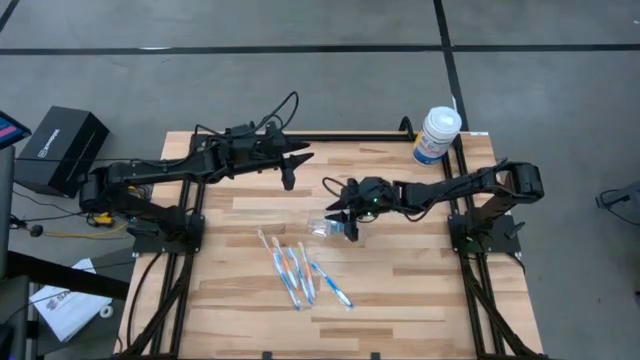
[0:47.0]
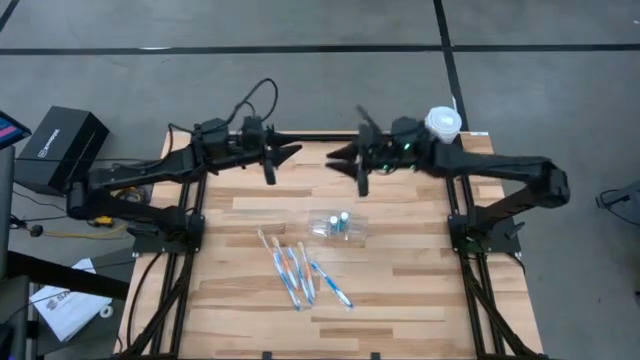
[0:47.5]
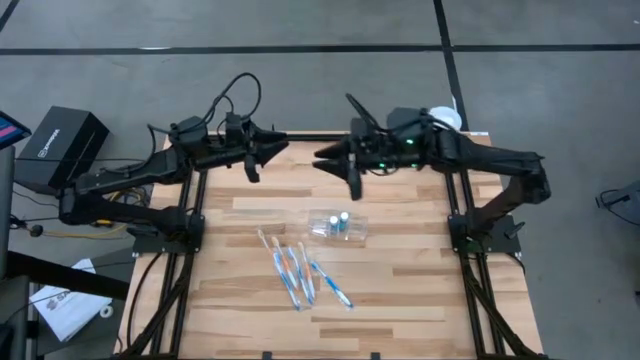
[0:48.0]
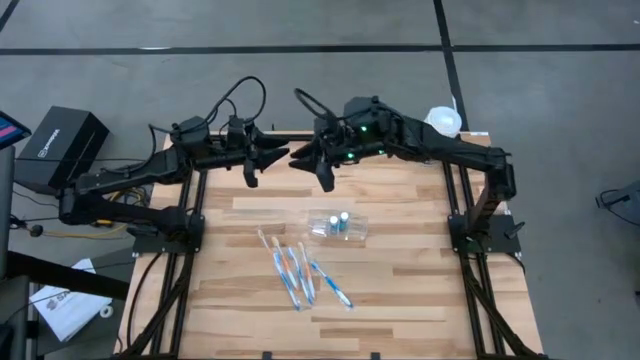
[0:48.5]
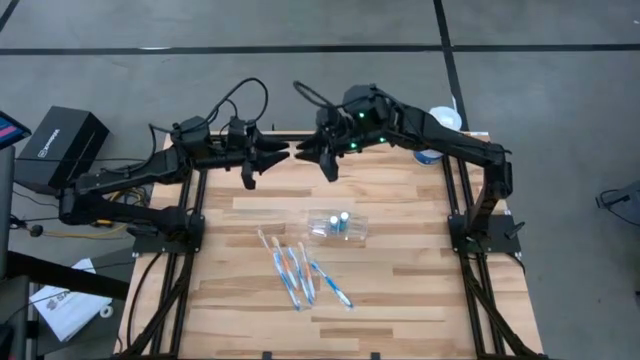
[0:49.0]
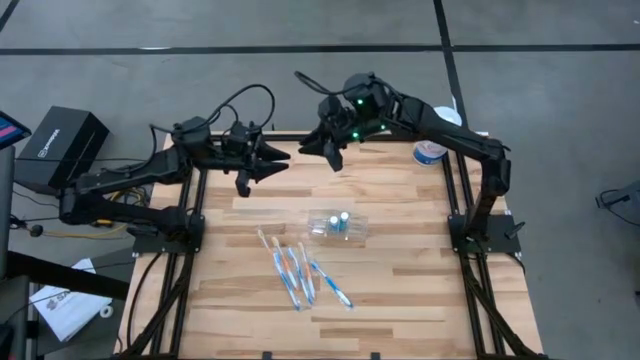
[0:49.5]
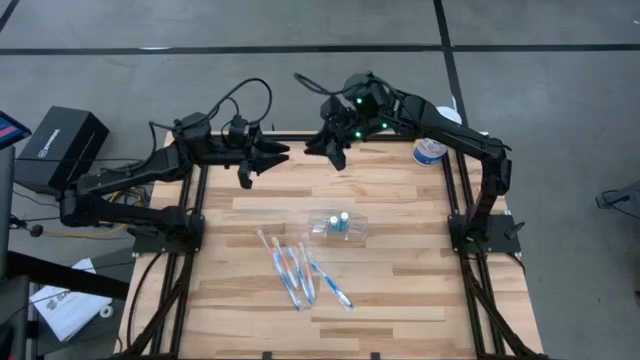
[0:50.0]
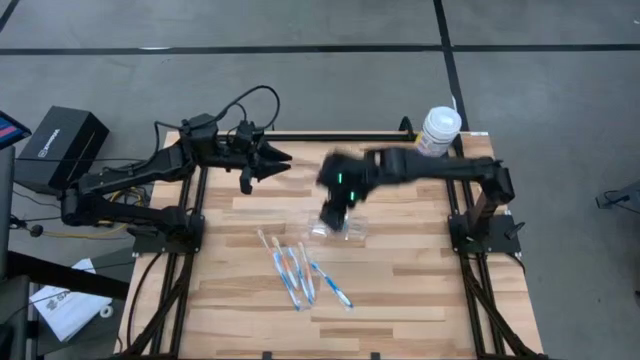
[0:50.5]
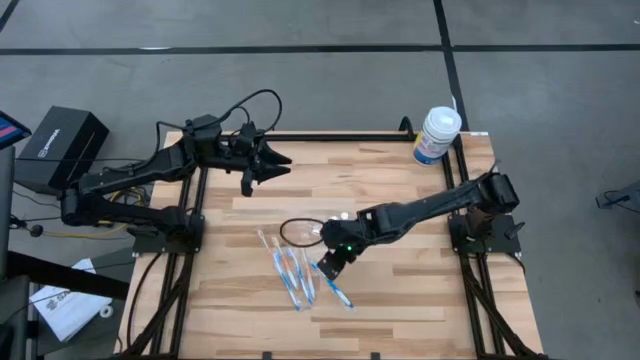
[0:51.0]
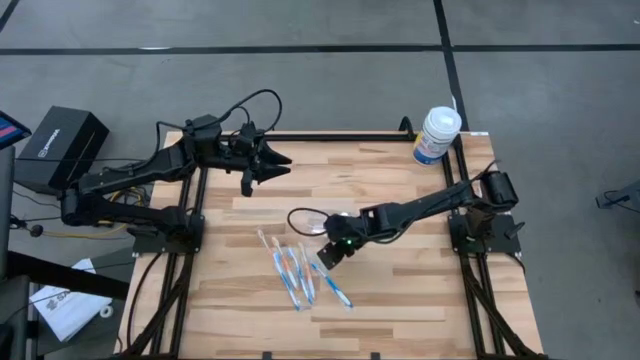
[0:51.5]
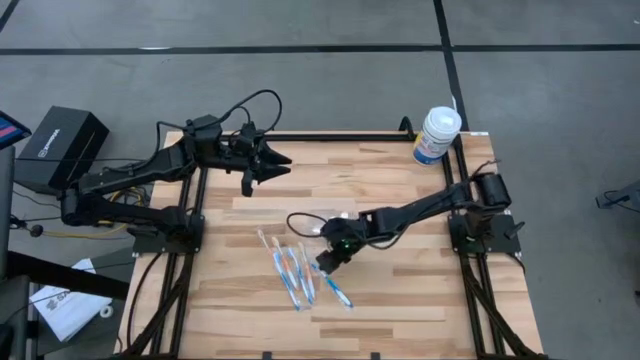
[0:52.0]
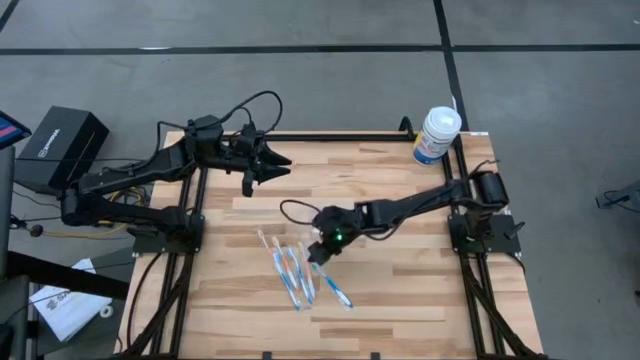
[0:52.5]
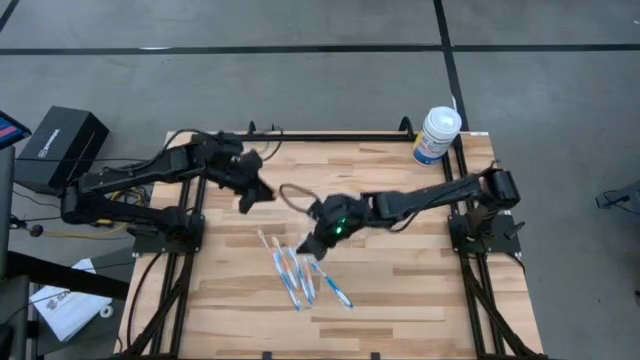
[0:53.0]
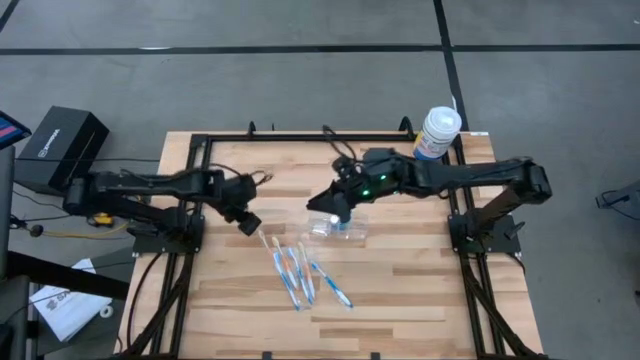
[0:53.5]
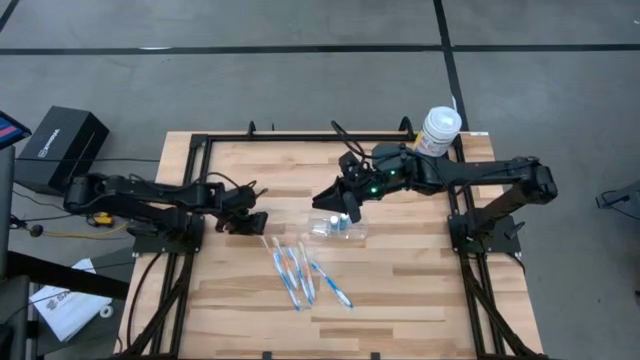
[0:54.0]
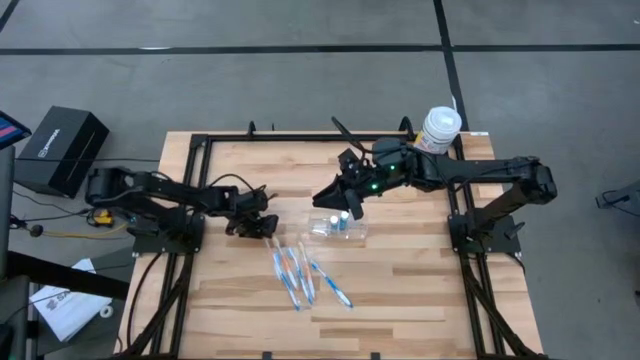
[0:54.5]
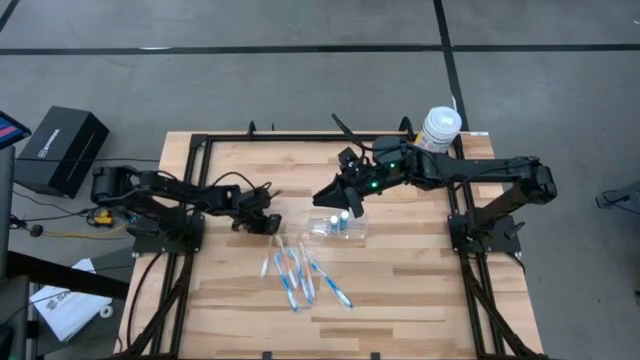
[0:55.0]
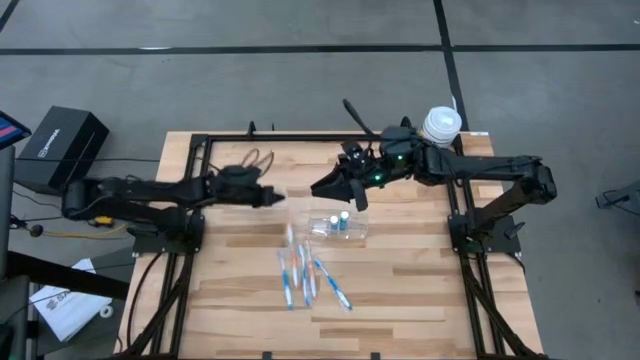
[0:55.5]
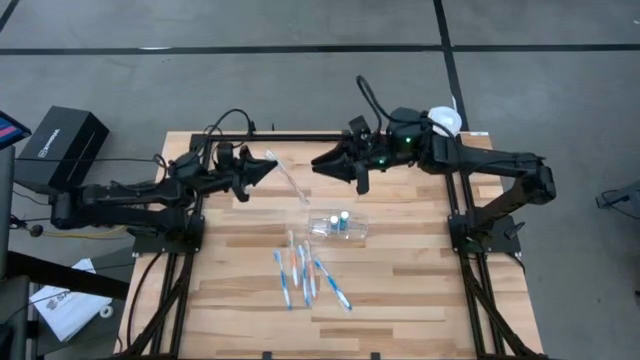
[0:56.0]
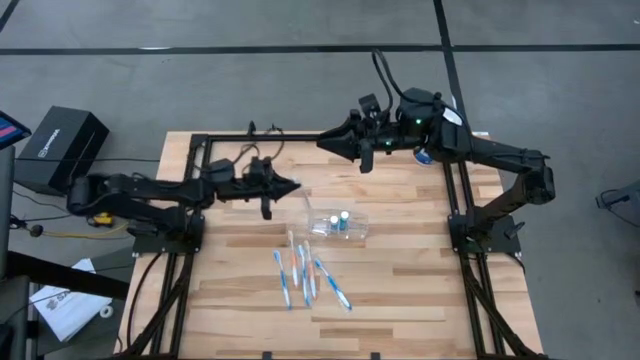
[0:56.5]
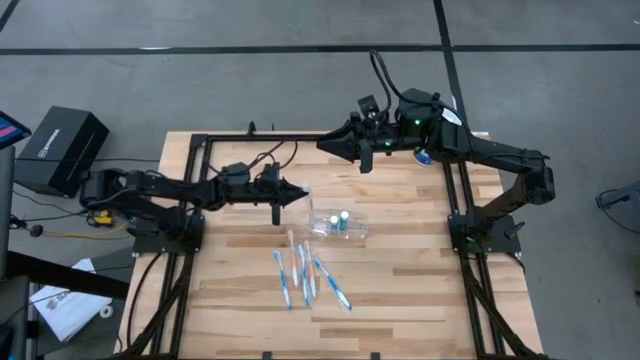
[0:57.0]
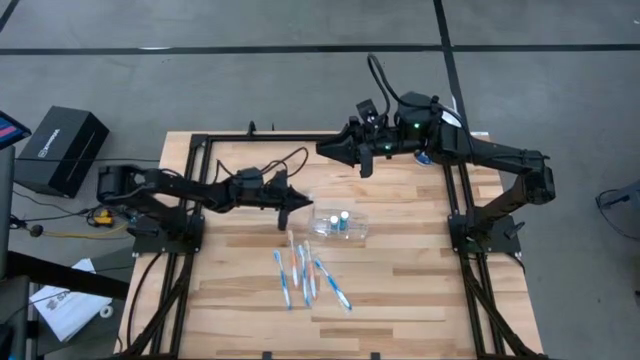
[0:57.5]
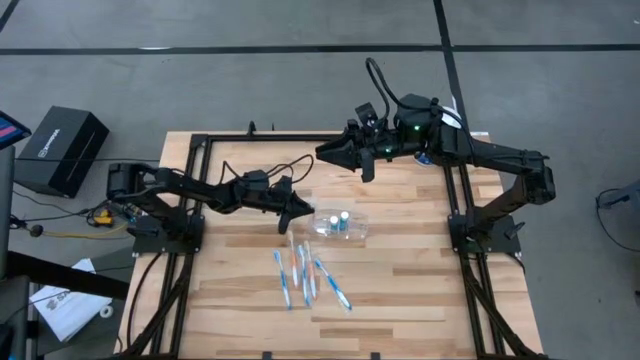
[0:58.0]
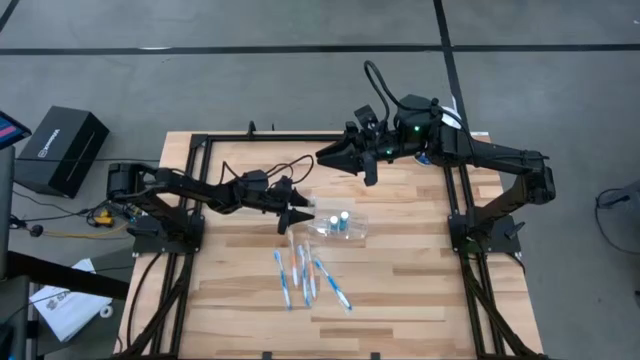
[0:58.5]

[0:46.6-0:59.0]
Task: Pick & Place toothbrushing station
Put the left orange toothbrush into the transparent organizer

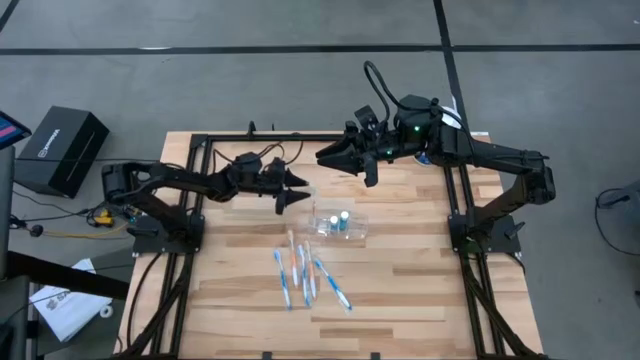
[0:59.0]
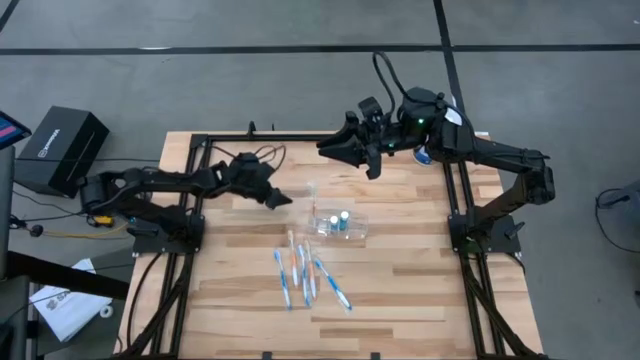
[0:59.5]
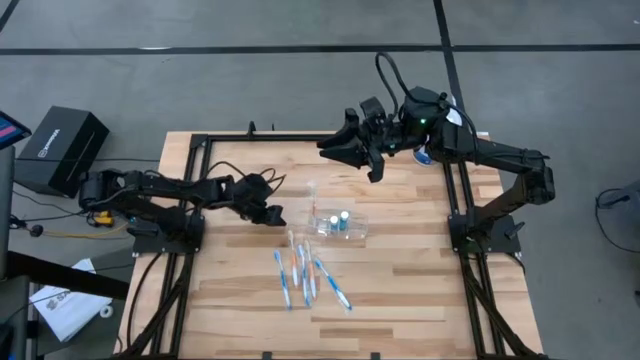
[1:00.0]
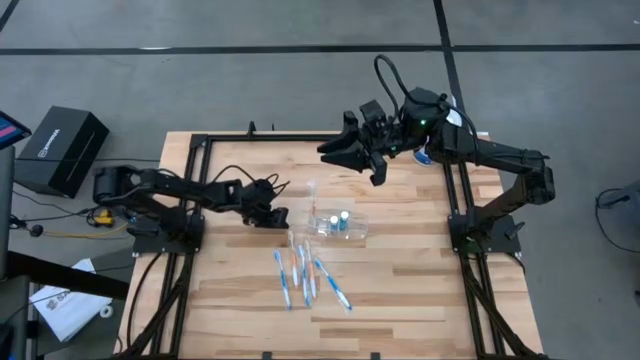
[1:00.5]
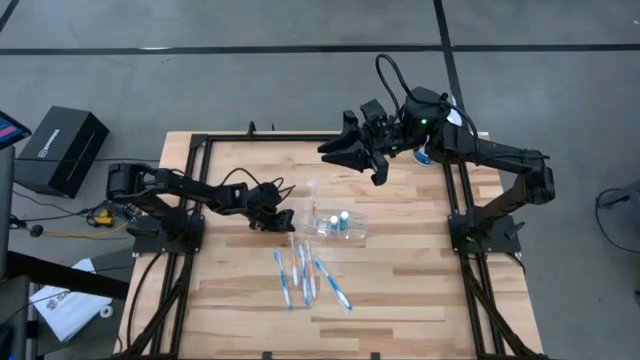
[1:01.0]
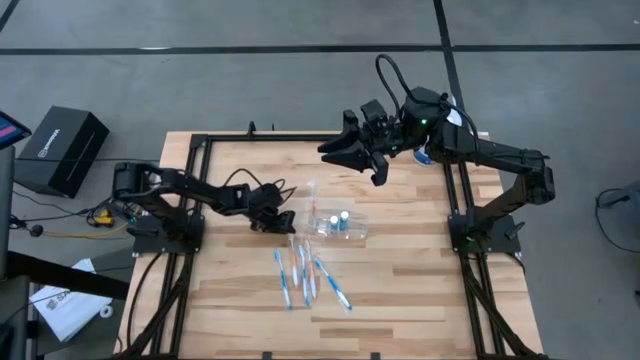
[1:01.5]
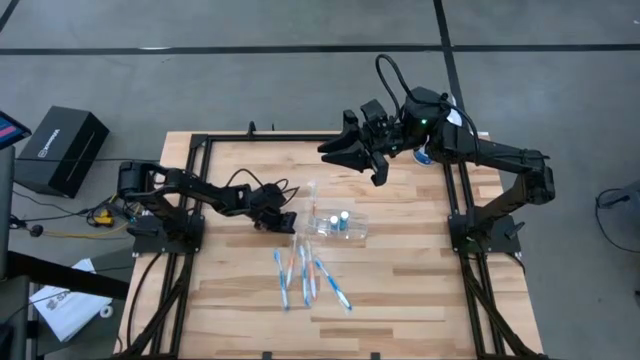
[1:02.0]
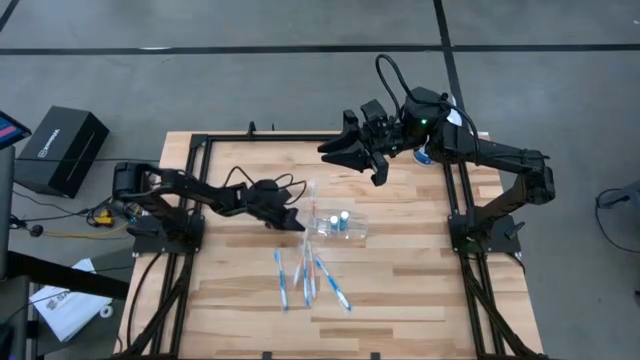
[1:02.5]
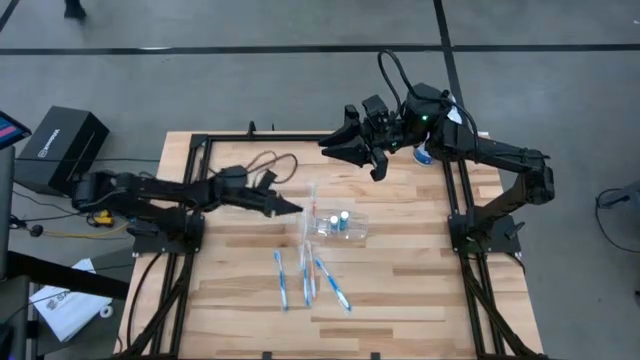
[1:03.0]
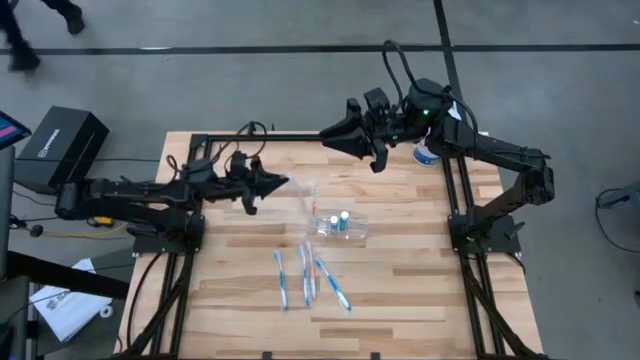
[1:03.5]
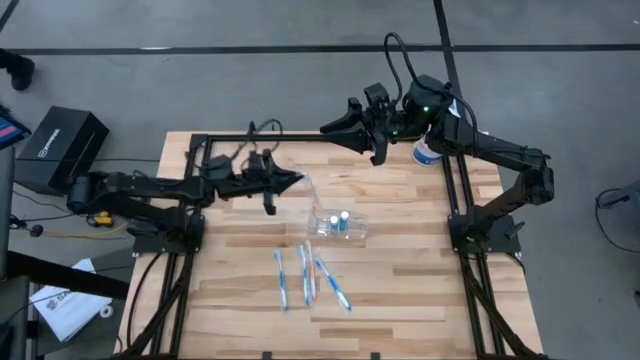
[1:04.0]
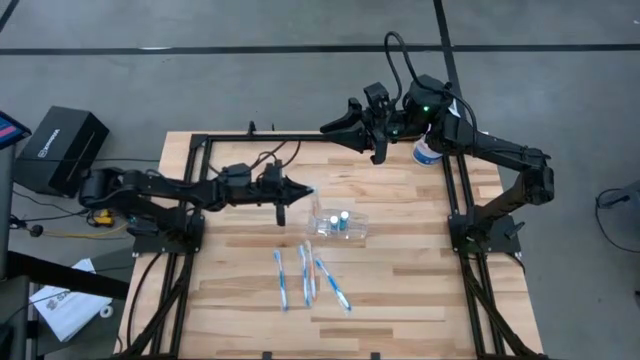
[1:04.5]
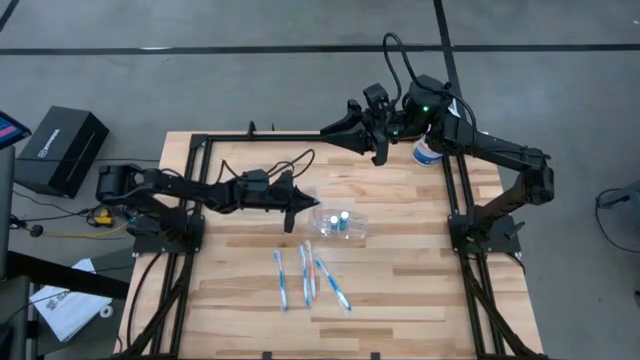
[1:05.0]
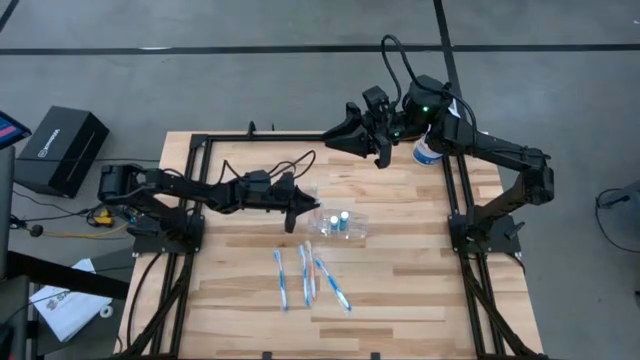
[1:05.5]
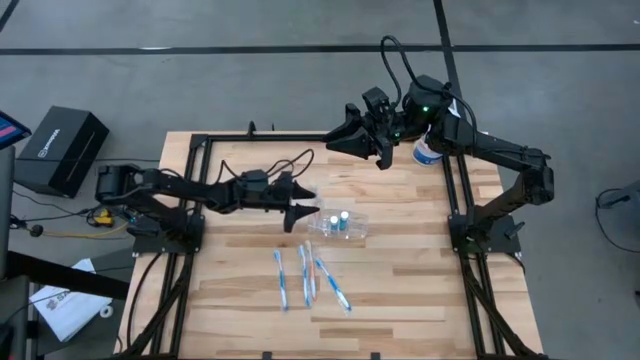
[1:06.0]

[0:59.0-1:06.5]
Put the left orange toothbrush into the transparent organizer

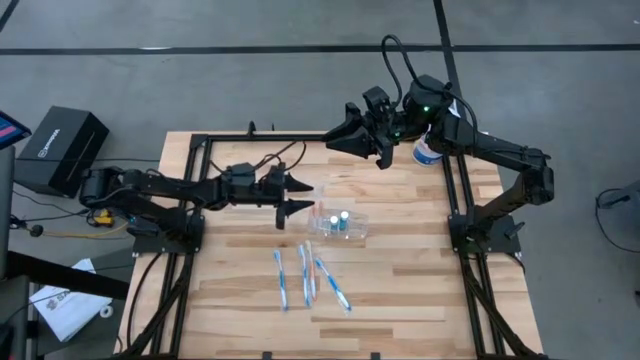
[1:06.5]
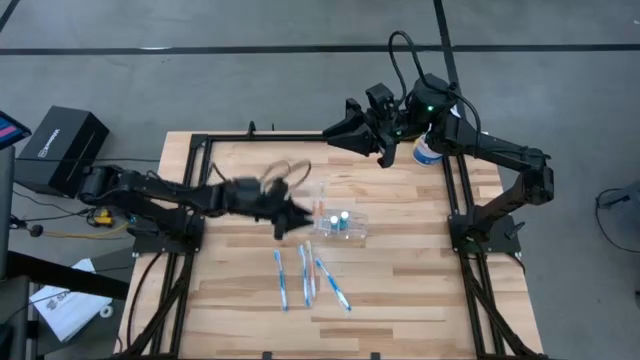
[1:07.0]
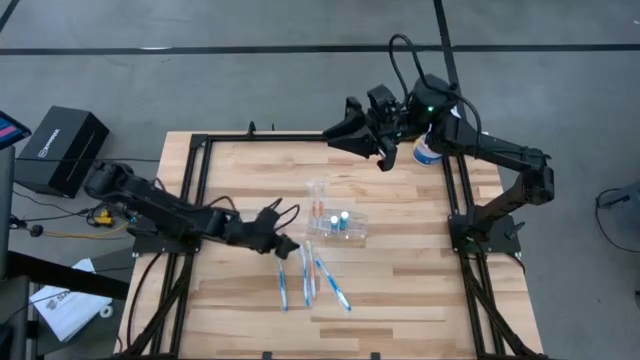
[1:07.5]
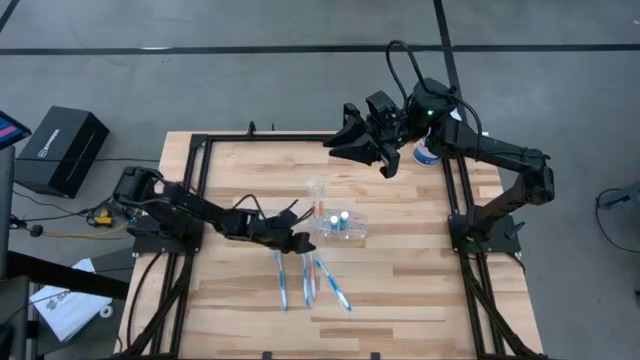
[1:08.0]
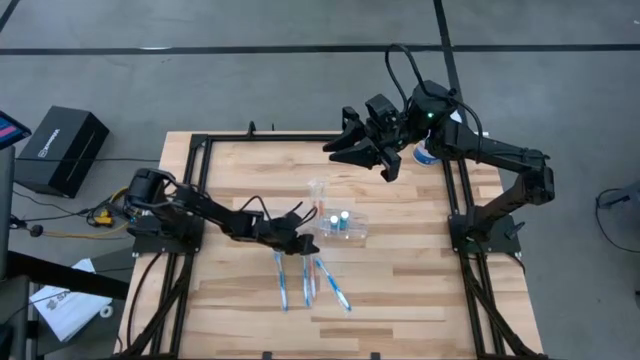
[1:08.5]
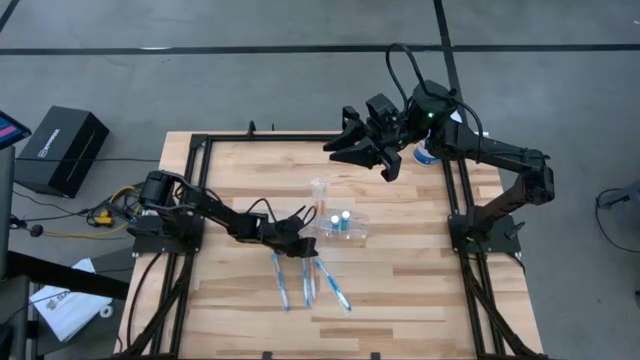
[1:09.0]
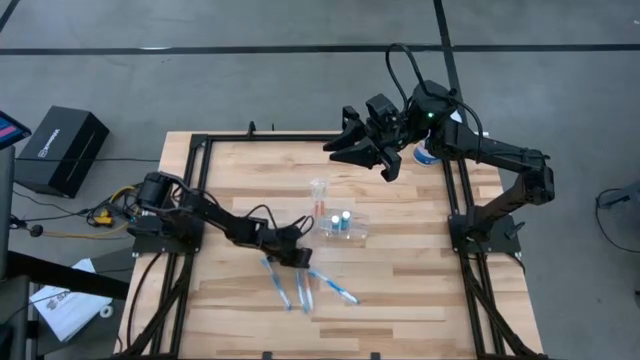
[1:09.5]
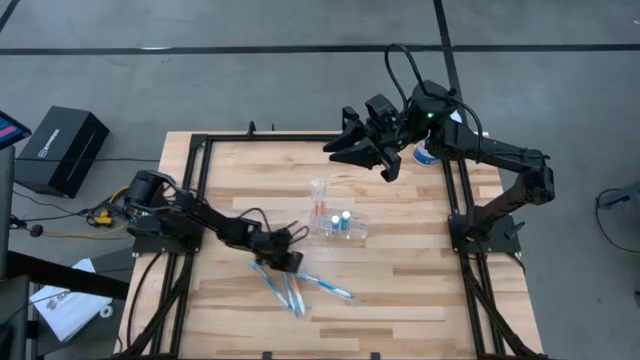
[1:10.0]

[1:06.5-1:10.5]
Put the orange toothbrush into the transparent organizer
